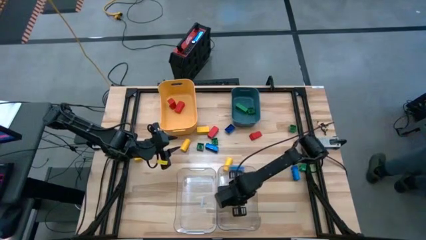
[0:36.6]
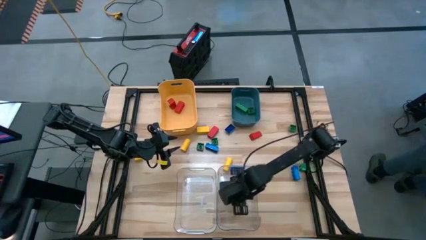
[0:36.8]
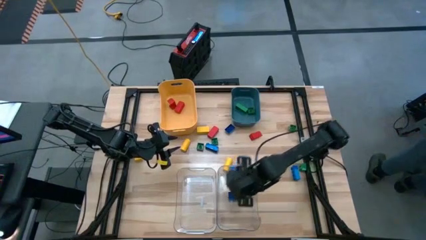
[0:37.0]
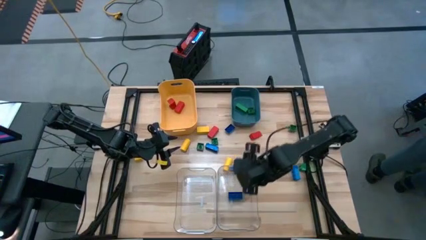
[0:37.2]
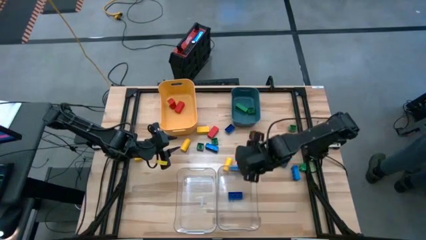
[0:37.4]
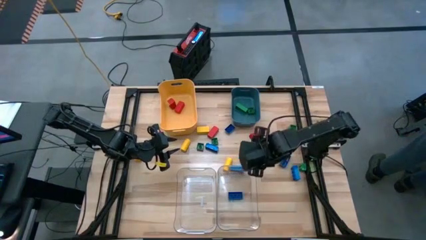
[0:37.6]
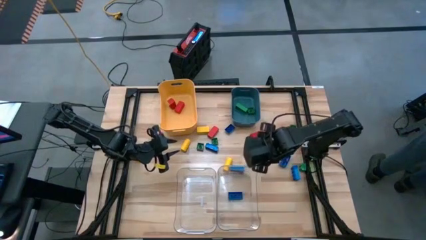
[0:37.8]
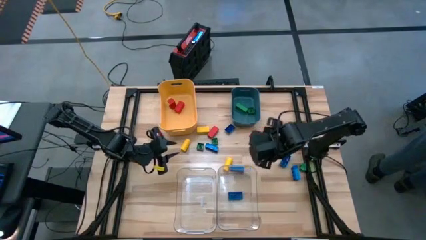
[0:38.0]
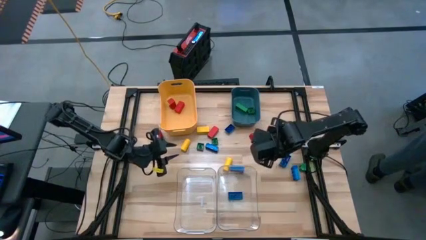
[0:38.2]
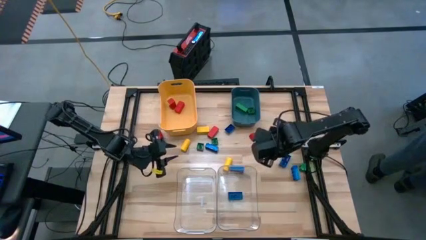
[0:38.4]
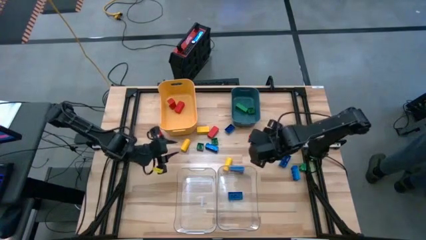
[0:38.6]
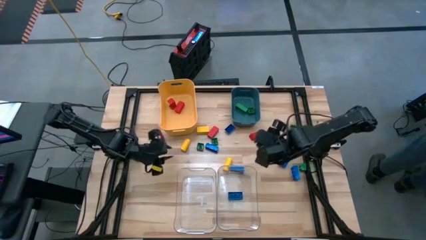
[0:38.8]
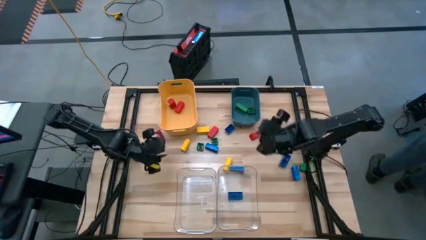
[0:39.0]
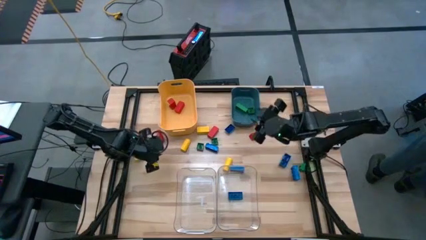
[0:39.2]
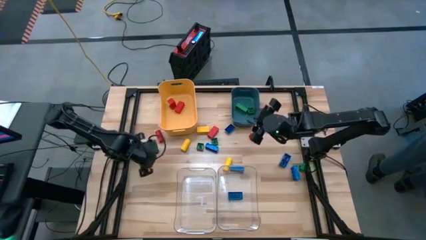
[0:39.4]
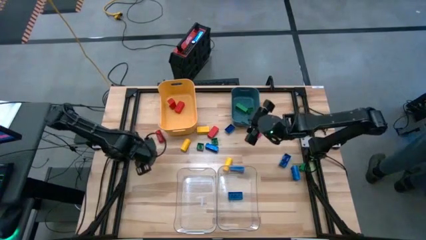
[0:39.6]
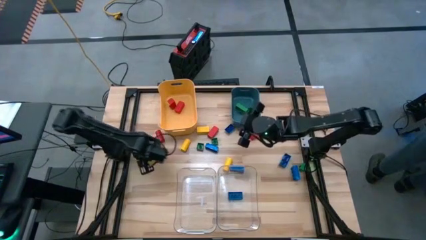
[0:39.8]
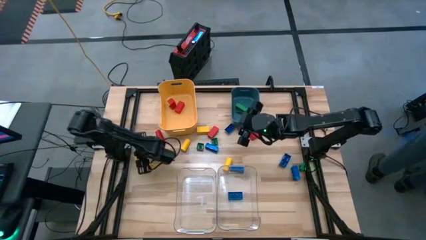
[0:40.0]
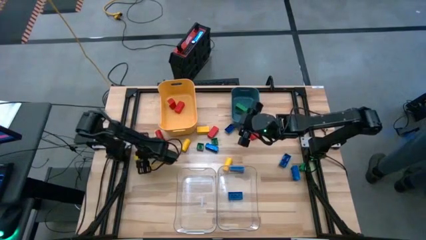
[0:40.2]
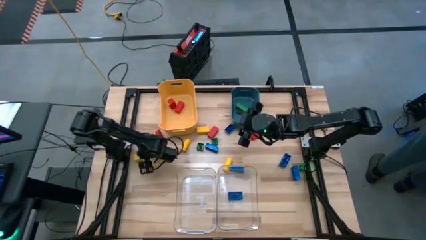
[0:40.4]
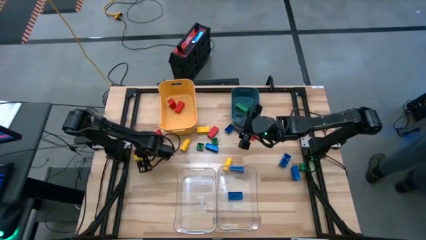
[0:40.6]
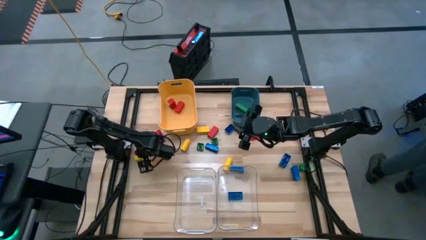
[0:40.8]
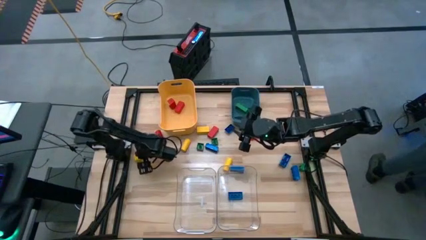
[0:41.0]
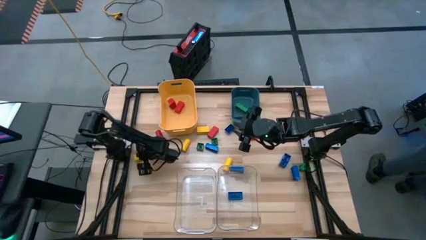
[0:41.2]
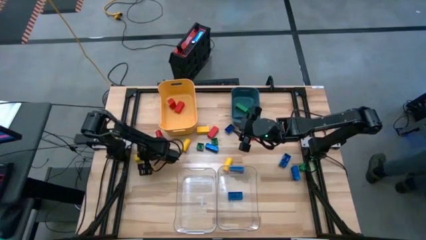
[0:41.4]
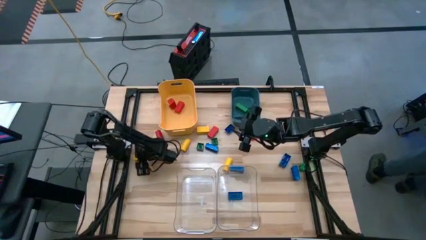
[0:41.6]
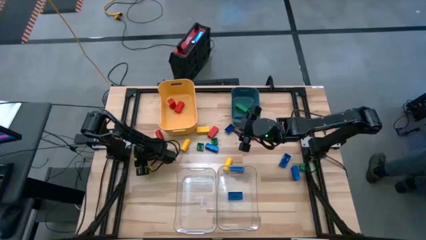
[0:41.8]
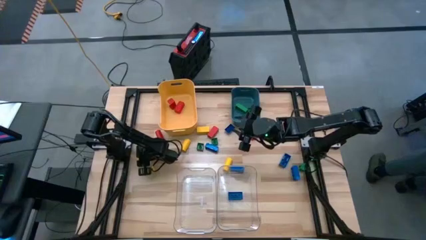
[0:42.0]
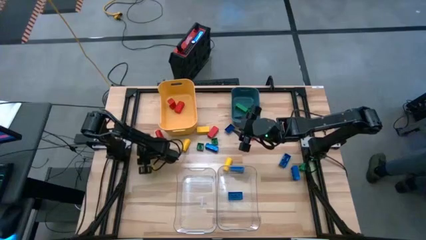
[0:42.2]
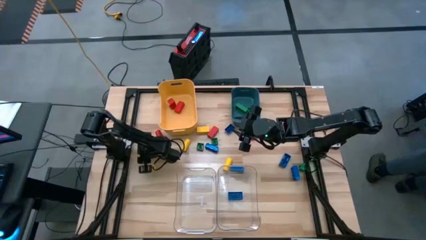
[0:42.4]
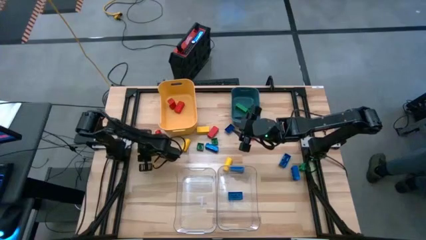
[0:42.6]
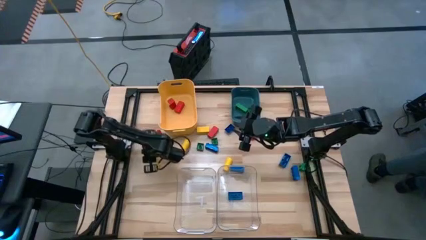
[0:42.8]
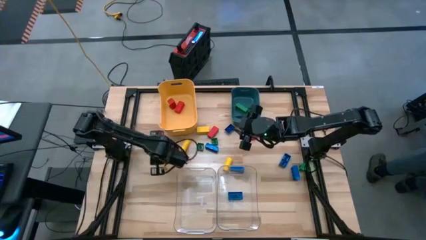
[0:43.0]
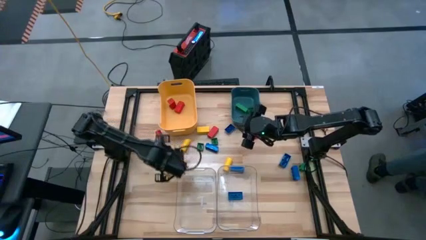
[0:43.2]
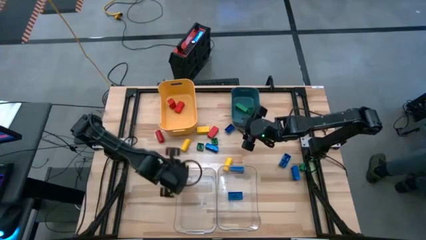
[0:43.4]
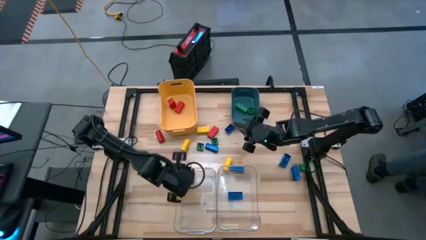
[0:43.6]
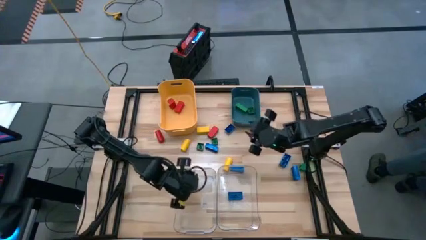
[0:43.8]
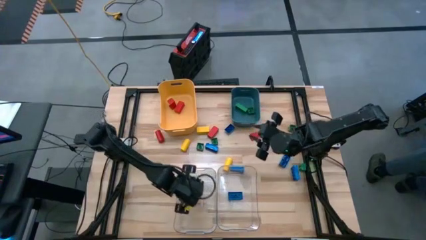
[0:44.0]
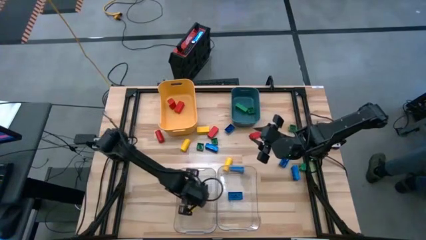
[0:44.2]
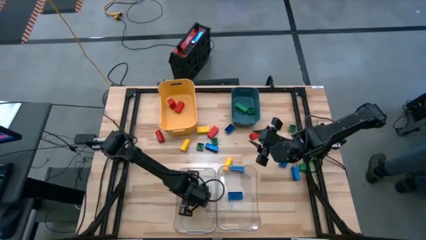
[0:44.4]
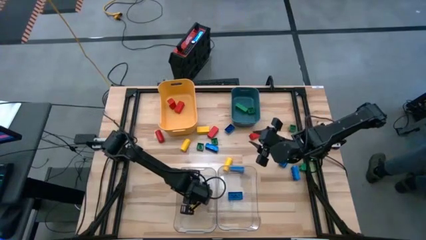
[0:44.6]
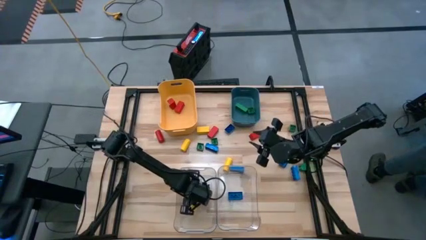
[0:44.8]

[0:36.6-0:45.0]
Task: Sort blocks
Put the yellow block into the left transparent bin

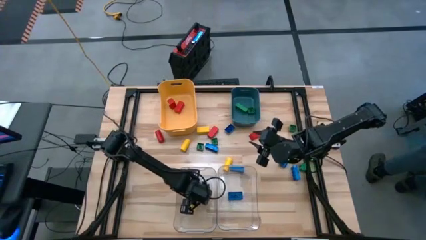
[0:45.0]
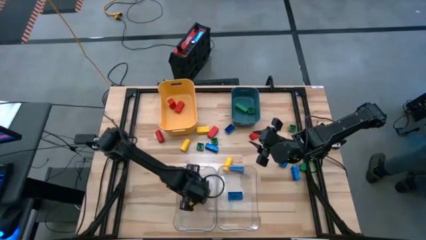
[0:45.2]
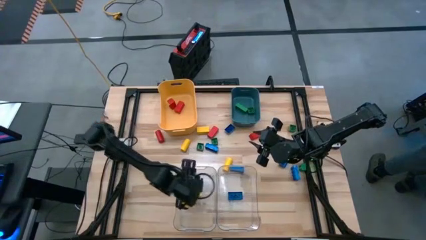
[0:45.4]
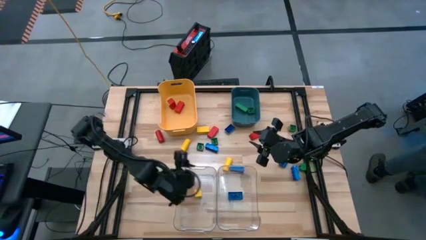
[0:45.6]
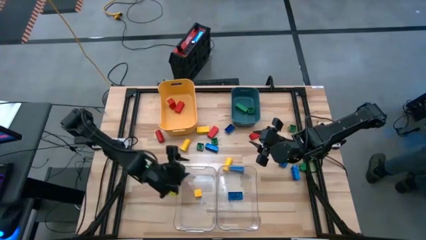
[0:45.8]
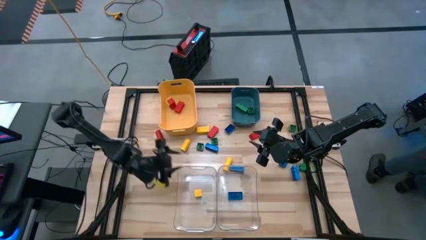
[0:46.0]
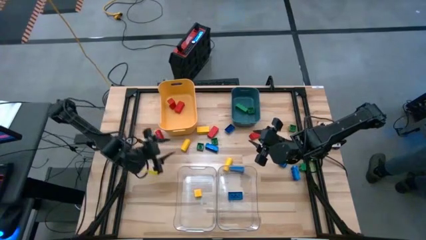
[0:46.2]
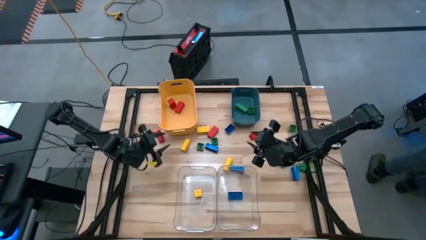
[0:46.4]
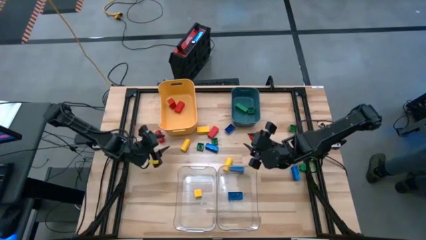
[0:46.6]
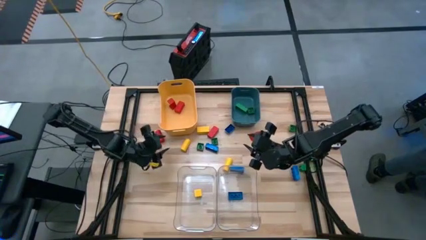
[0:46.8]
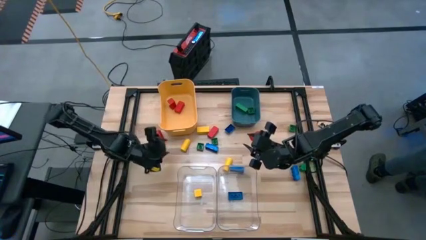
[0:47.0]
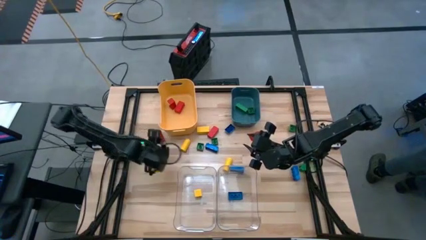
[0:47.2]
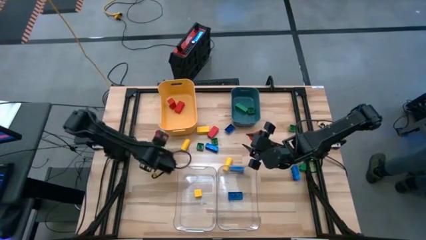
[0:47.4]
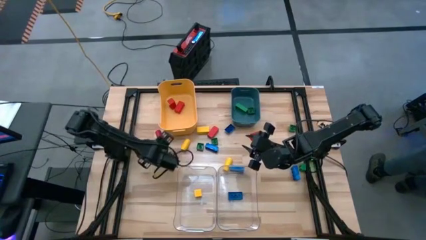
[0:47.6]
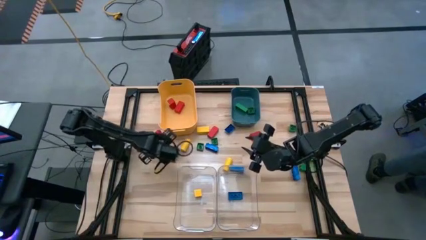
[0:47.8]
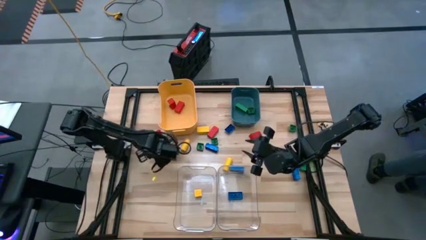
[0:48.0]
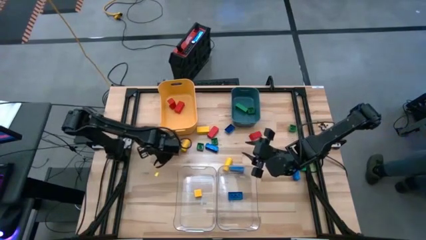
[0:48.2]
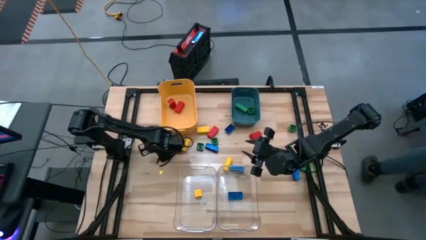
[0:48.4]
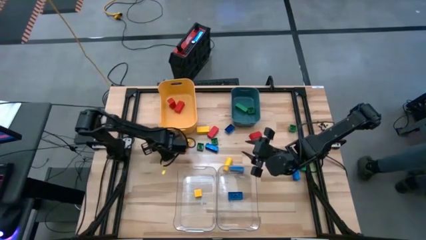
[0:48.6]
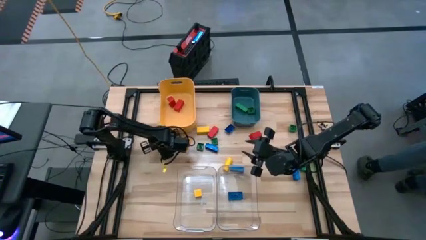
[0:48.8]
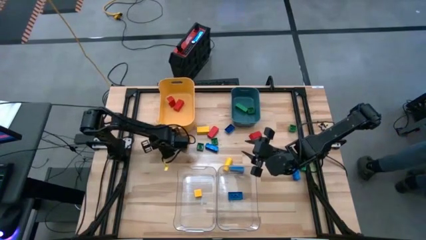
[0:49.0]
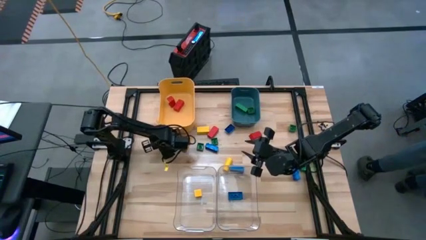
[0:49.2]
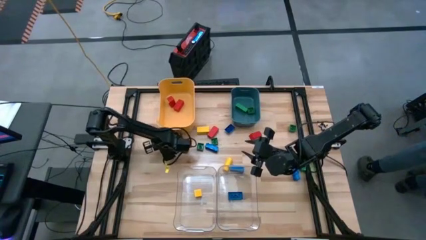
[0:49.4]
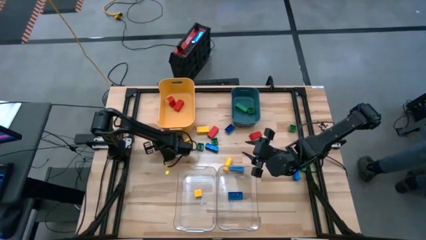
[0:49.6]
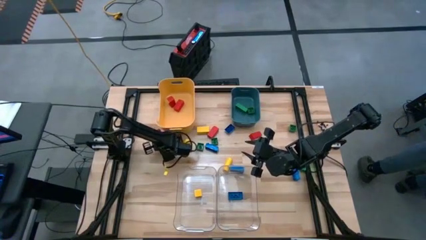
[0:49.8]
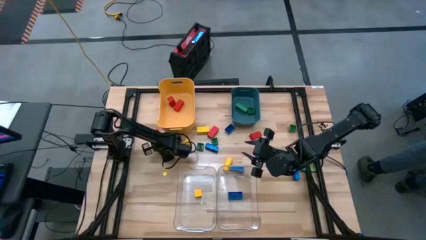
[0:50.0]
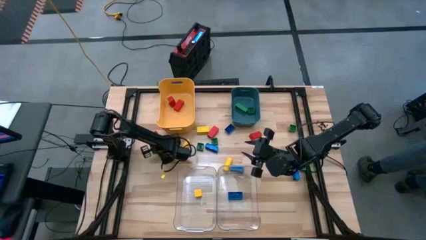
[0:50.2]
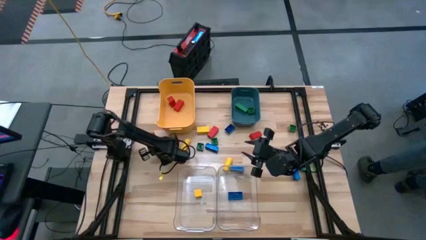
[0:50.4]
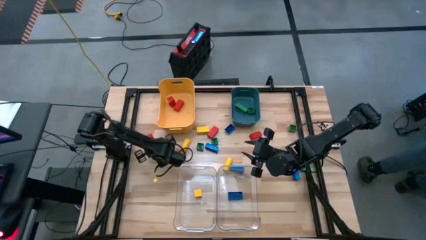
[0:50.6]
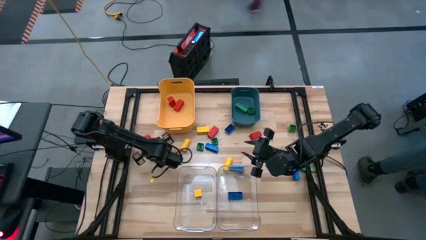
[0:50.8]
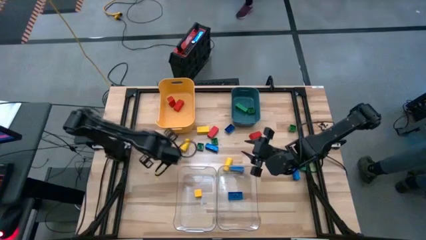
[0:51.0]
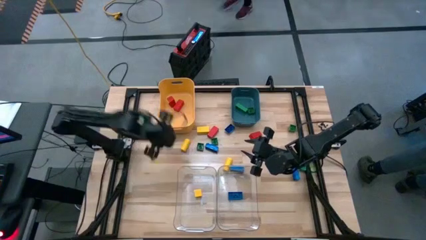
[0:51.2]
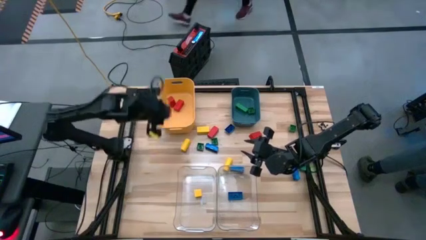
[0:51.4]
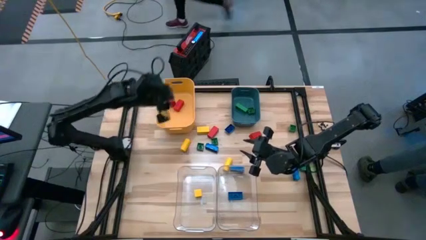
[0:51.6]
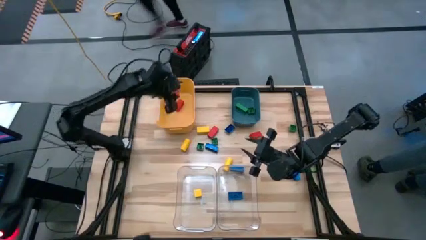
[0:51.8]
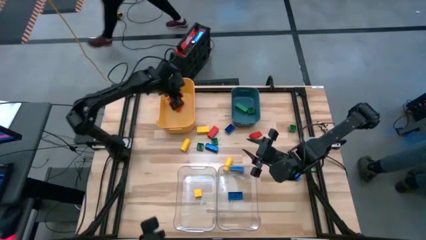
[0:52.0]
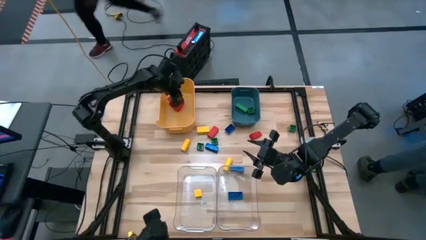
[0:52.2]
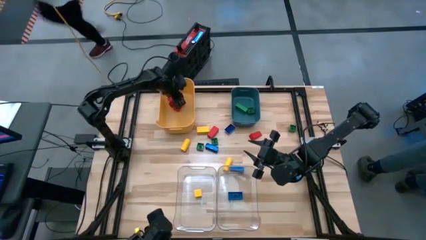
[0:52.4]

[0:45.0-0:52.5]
Put the red block into the yellow bin

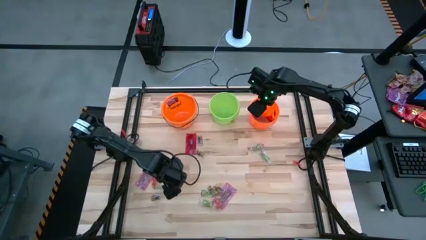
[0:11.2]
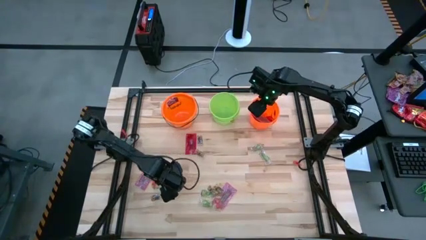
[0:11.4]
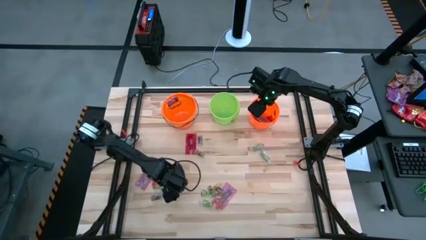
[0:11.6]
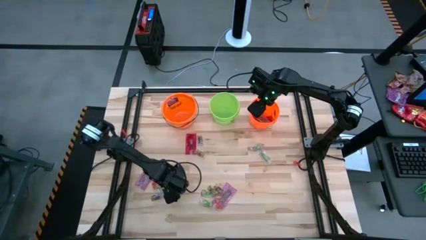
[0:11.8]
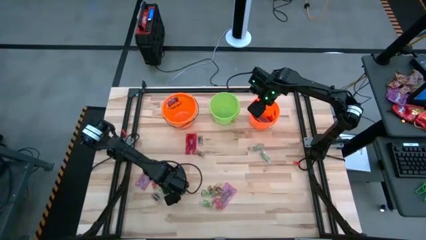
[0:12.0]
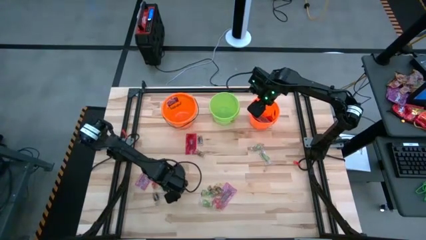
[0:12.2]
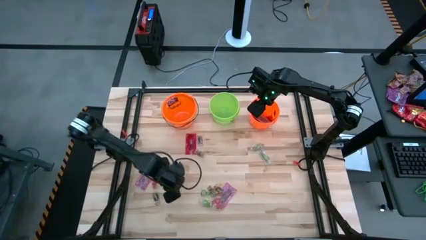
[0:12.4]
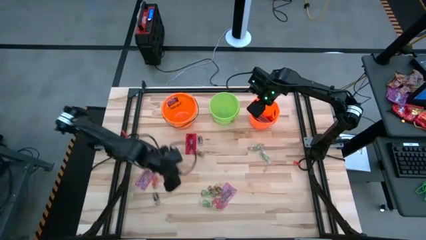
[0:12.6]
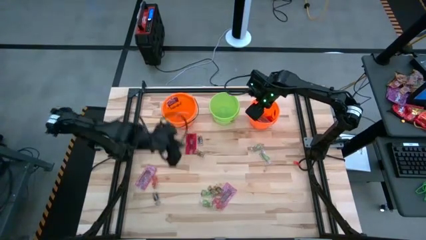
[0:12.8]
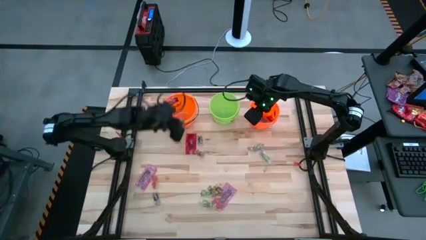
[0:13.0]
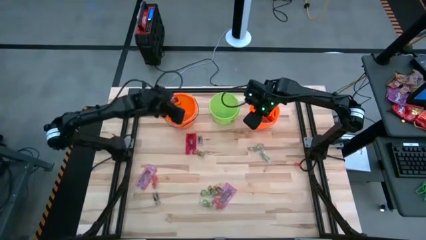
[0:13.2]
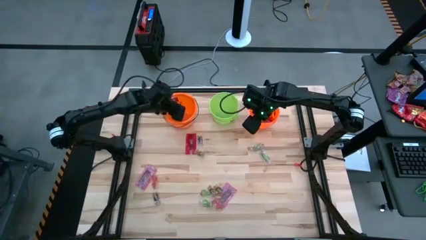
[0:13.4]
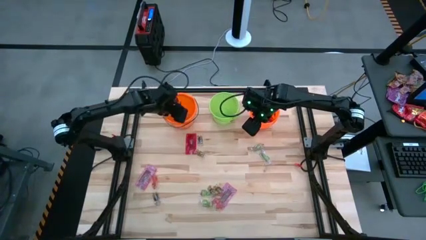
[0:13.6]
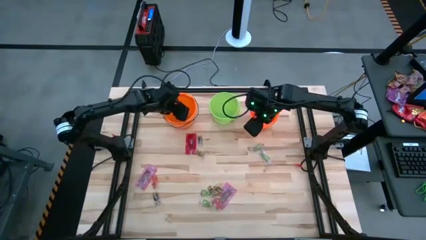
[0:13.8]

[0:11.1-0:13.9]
Task: Sort candy by brand, put in halloween buckets
Put the green gummy into the left orange bucket
